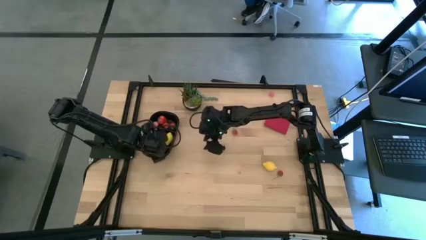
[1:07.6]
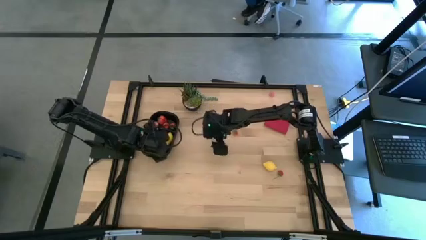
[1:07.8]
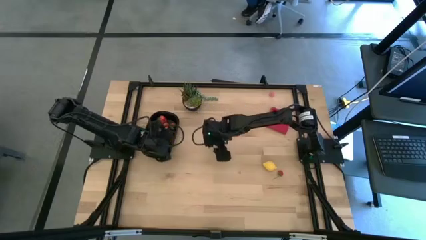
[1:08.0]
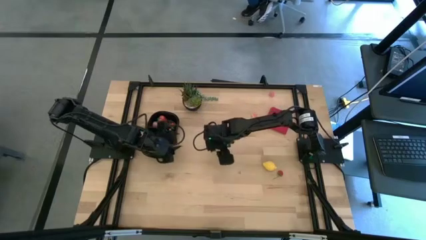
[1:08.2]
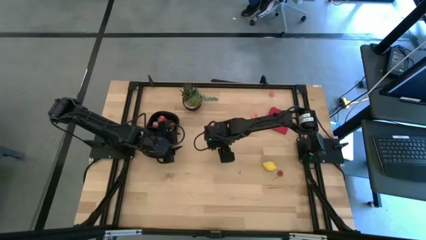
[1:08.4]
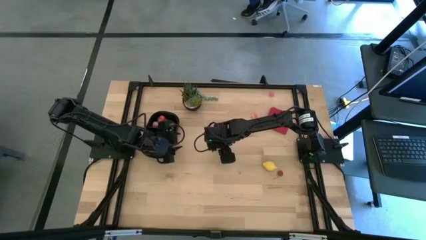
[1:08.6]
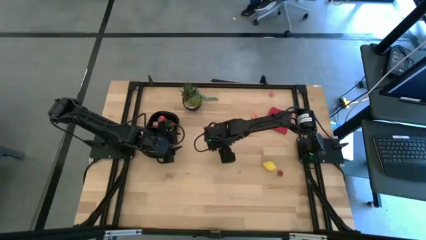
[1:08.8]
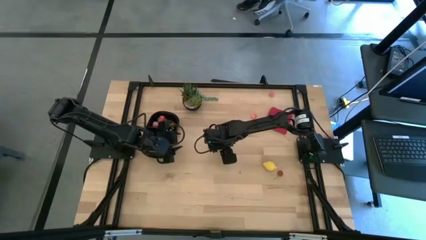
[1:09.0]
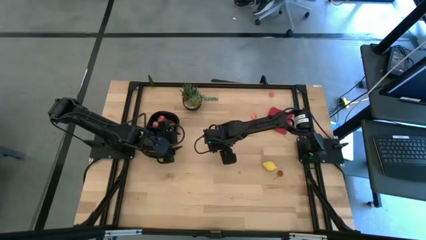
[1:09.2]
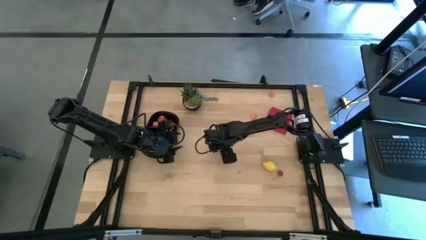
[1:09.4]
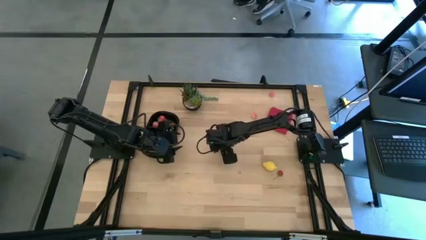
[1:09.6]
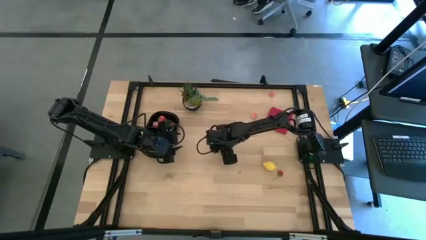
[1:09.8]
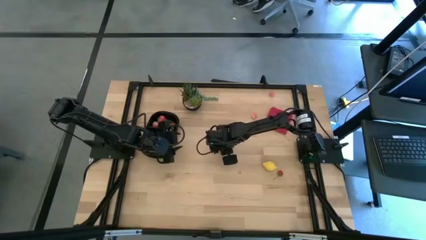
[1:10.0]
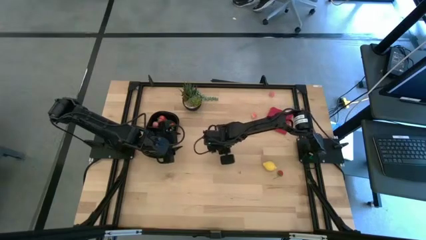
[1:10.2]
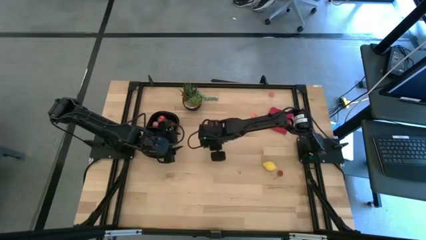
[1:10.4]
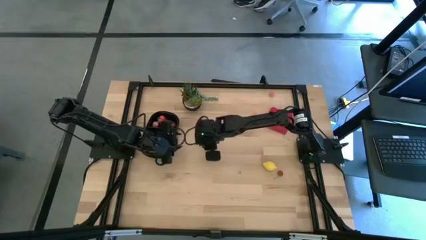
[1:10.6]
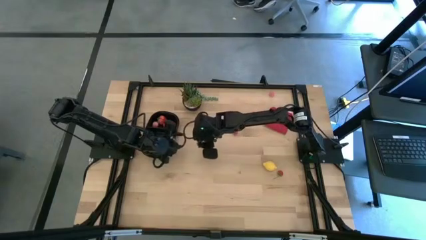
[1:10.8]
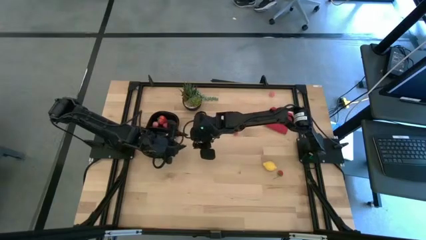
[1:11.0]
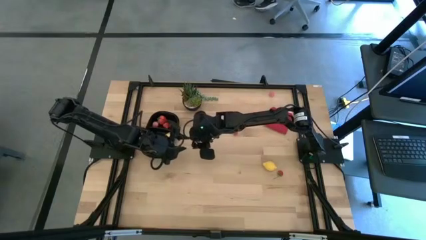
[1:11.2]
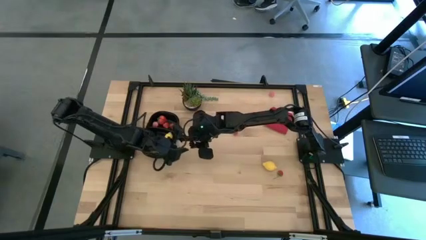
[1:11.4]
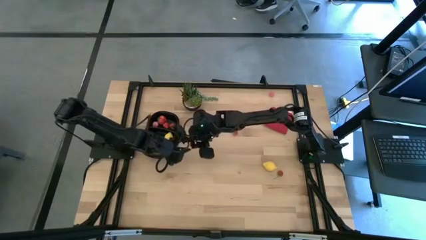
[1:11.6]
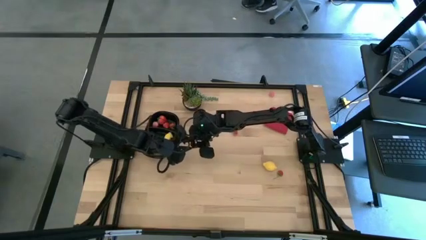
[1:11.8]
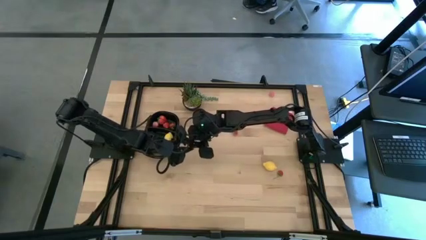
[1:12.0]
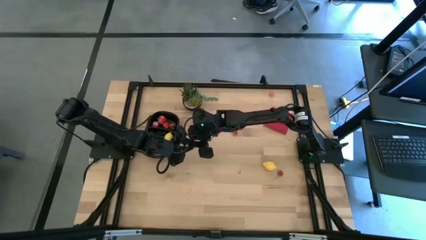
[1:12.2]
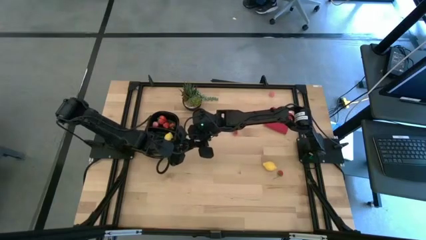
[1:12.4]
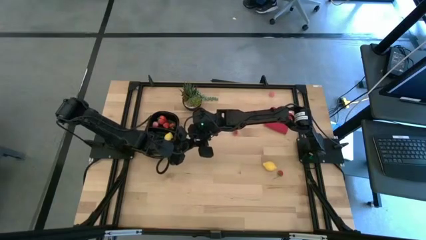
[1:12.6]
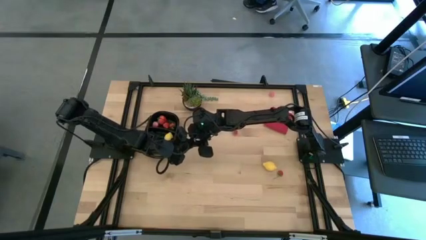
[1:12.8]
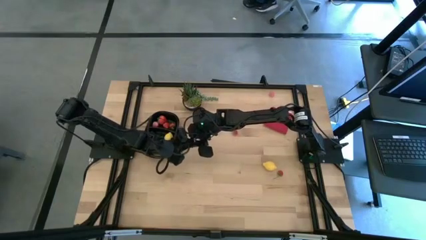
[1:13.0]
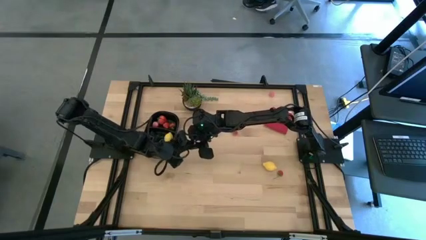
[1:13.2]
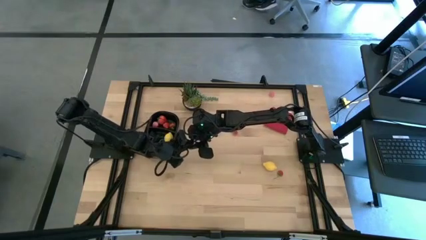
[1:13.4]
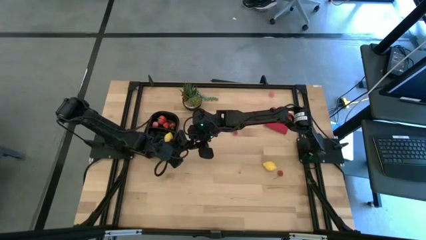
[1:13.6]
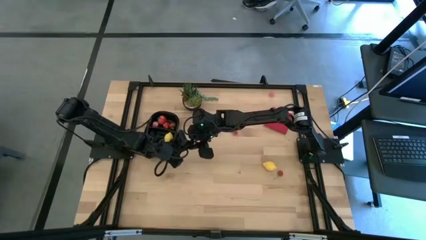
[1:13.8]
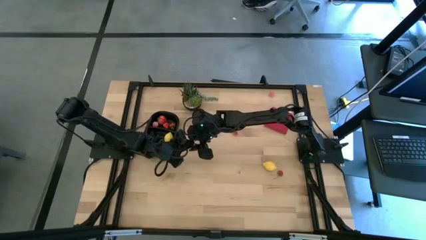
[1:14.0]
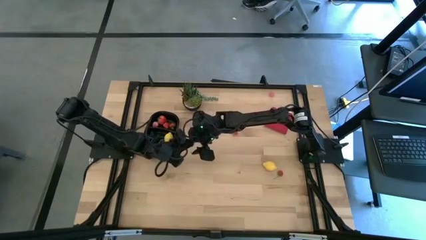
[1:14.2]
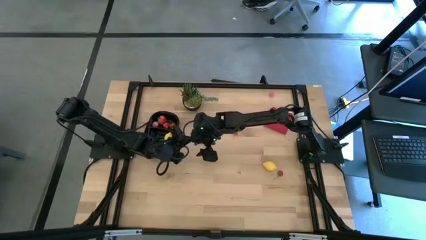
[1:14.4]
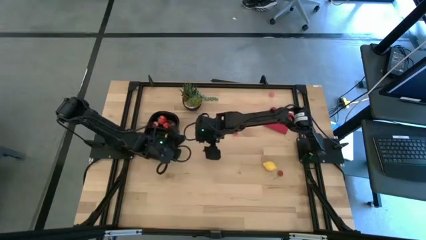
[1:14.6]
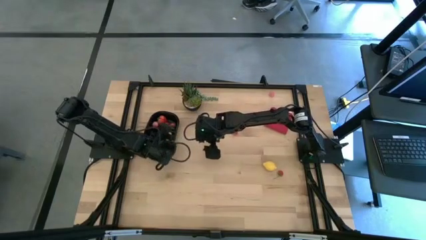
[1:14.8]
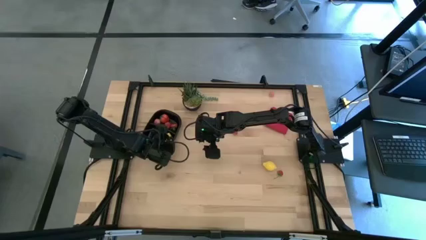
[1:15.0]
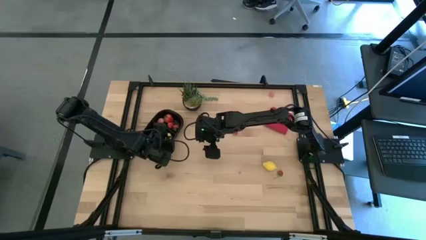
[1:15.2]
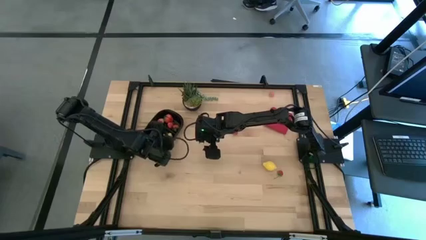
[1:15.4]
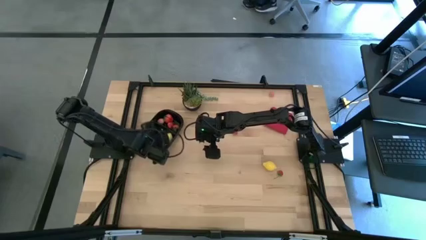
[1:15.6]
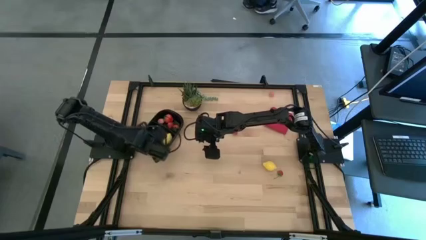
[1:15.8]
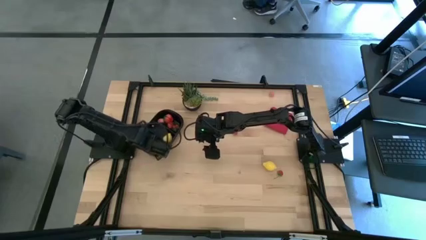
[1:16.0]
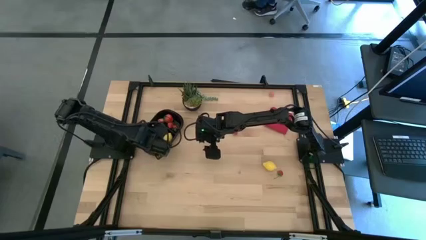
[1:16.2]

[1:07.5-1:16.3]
Task: Pick and placing Produce into tupperware
Put the black cherry into the black container

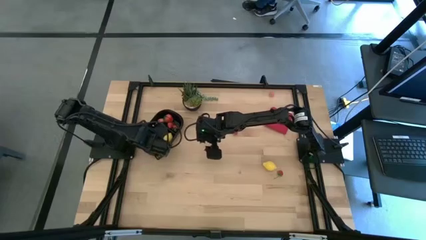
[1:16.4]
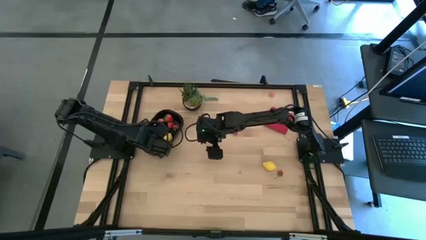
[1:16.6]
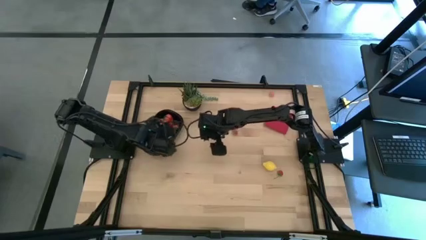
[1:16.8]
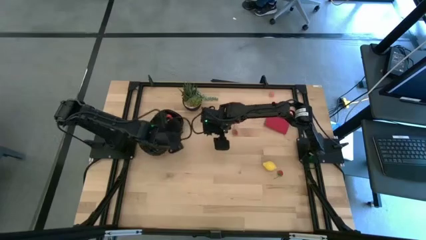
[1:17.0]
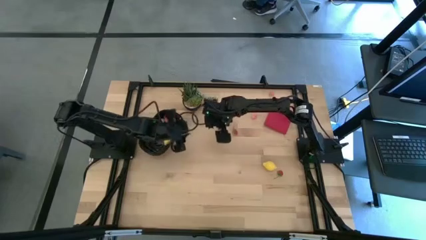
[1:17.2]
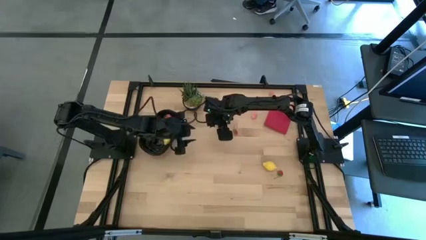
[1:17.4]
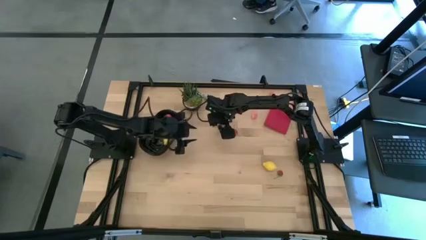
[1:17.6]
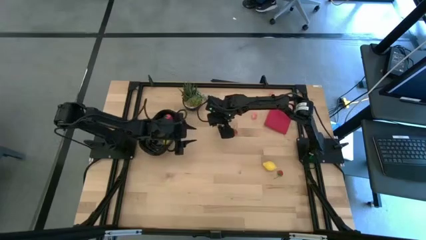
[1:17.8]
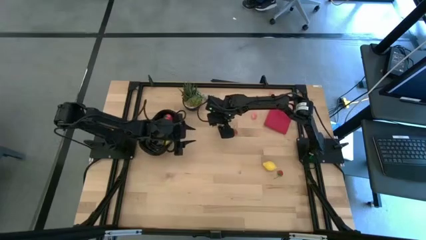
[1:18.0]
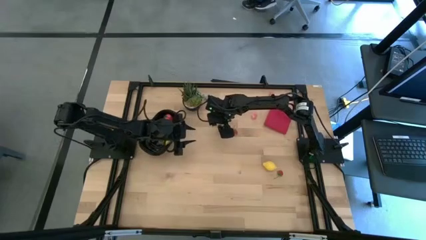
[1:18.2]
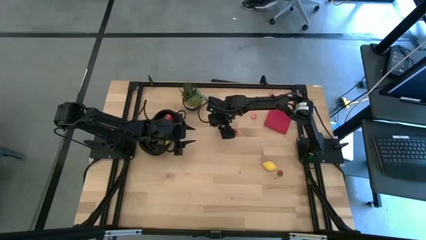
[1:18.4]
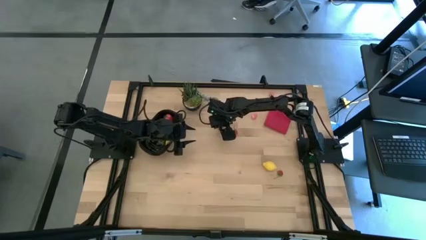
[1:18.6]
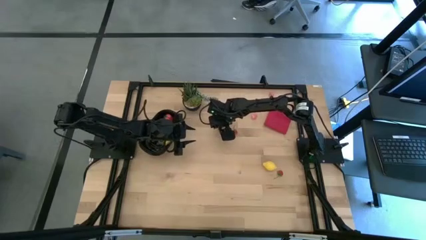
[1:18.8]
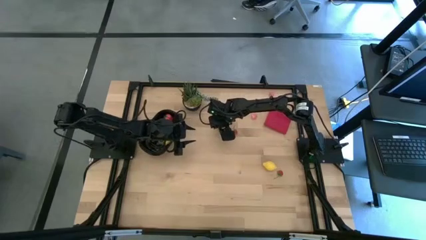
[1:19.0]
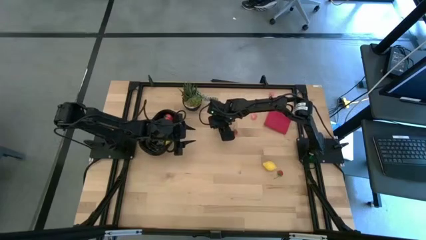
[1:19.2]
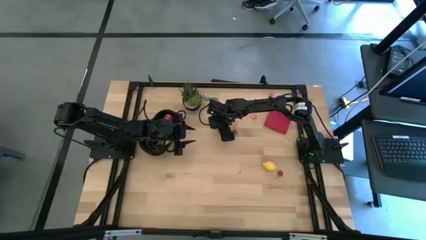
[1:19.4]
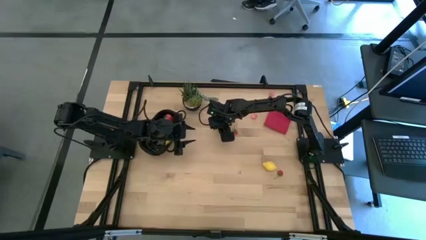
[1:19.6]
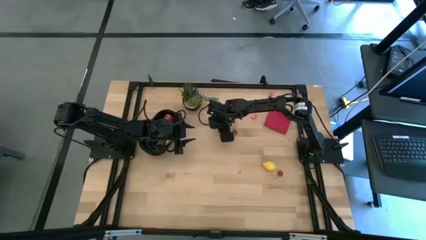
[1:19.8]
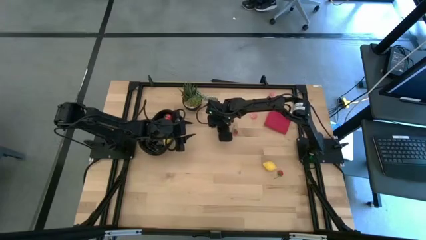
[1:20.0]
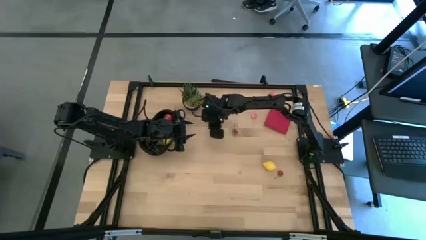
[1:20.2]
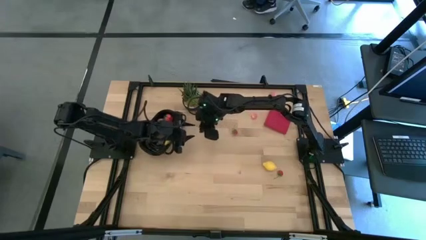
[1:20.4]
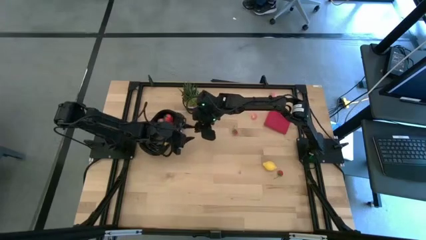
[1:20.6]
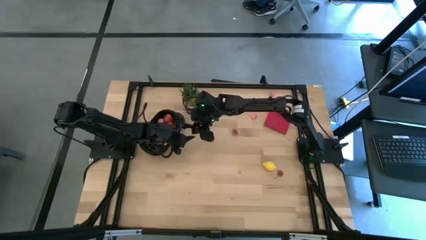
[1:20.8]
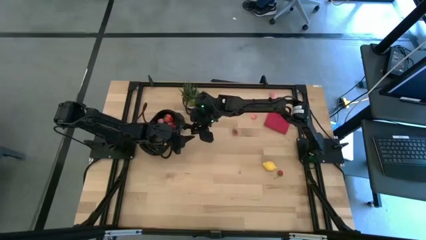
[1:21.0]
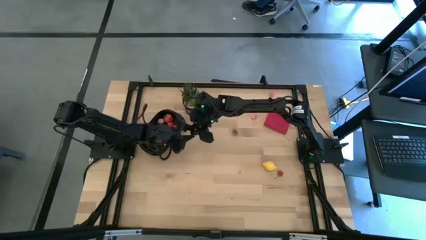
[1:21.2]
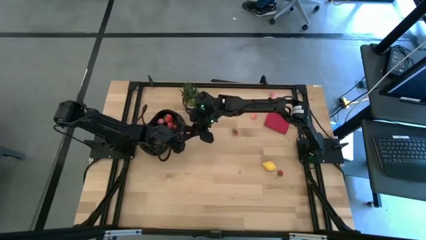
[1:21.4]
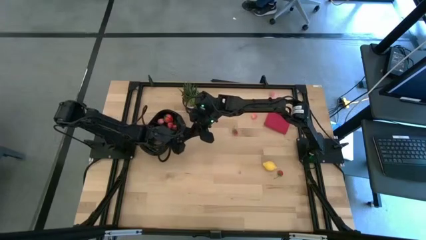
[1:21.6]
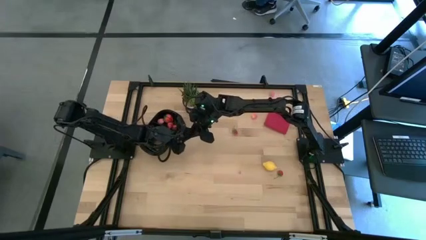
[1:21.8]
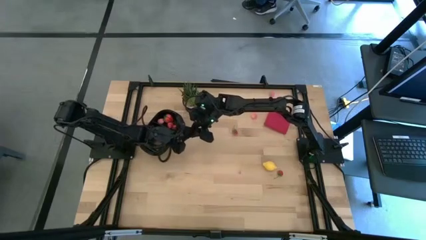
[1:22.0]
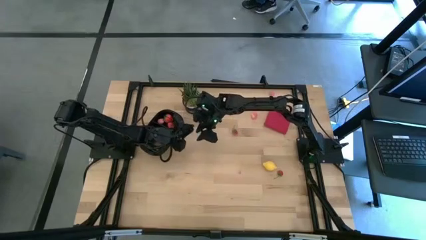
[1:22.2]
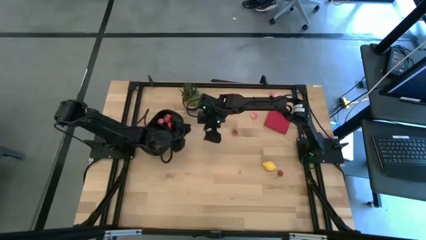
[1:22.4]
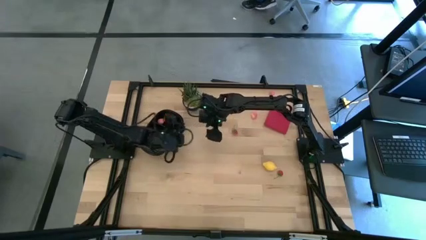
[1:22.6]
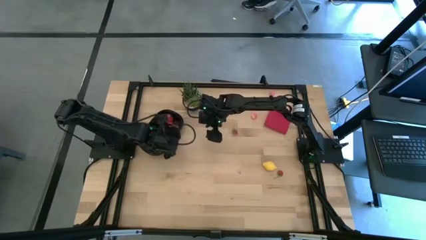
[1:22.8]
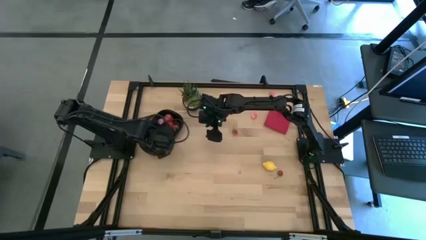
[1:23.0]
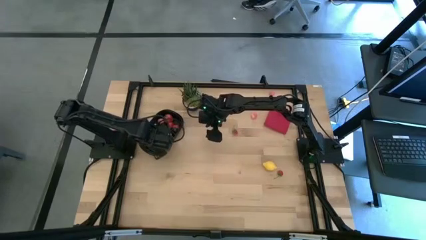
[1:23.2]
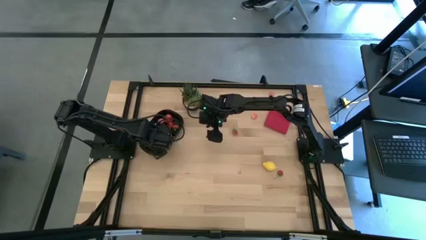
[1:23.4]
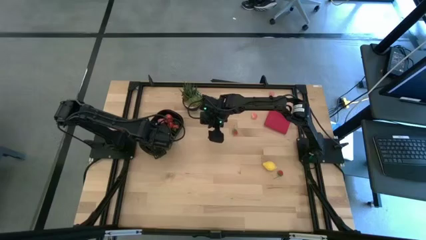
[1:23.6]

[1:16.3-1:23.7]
Put the black cherry into the black container
